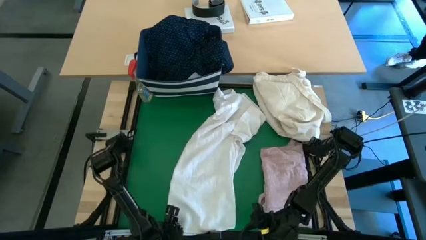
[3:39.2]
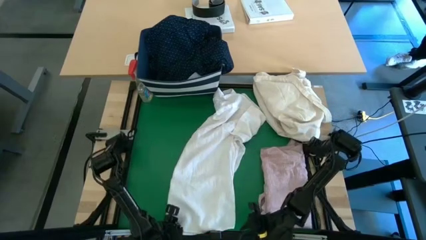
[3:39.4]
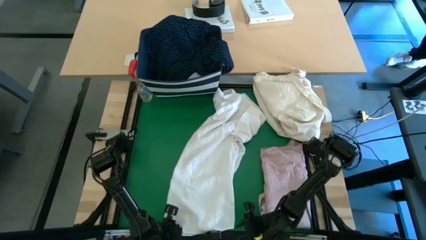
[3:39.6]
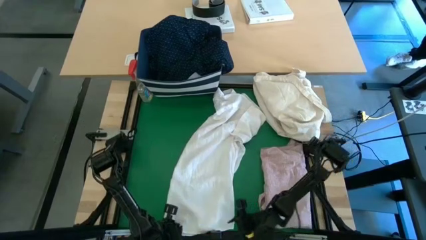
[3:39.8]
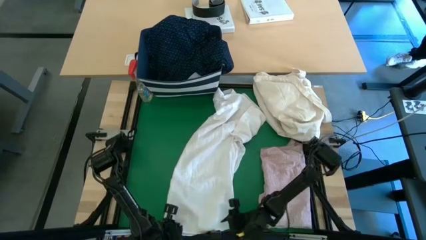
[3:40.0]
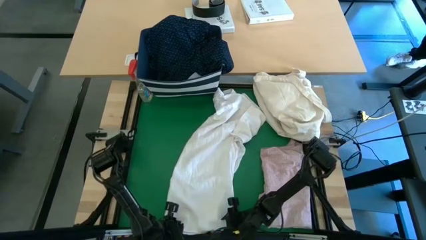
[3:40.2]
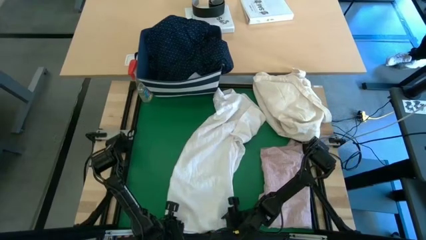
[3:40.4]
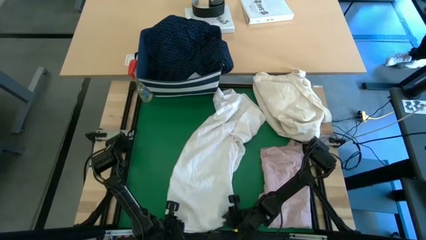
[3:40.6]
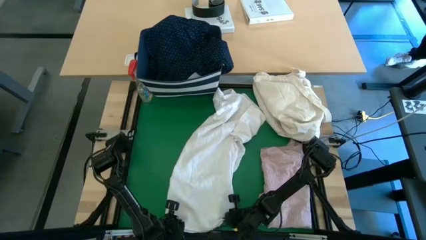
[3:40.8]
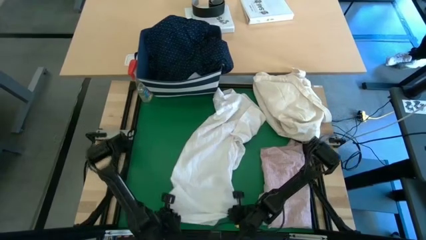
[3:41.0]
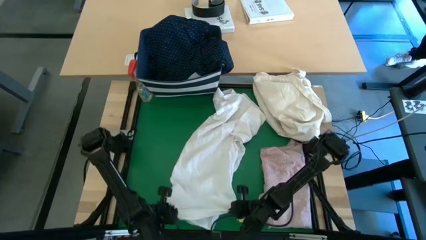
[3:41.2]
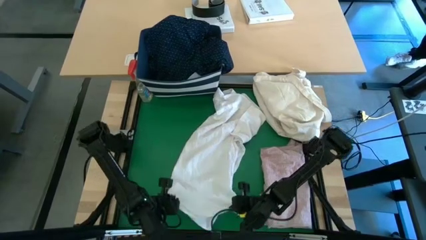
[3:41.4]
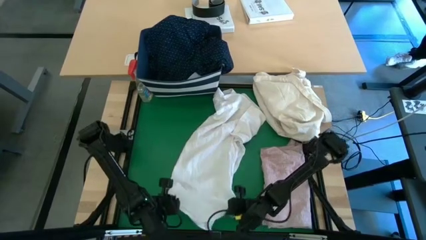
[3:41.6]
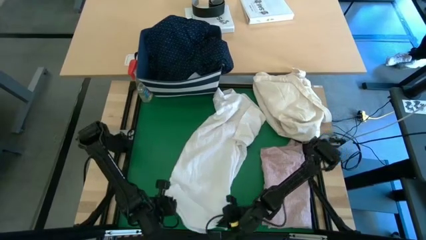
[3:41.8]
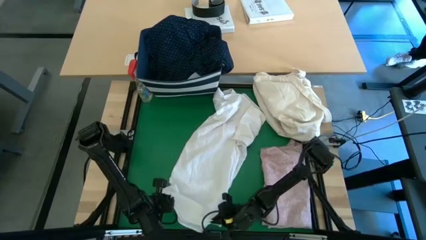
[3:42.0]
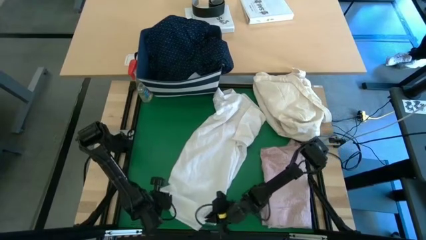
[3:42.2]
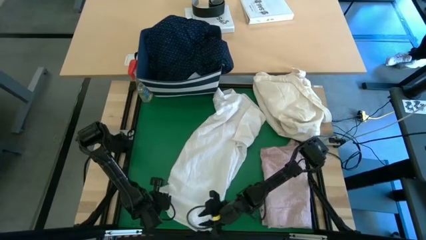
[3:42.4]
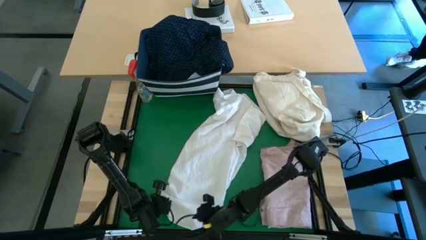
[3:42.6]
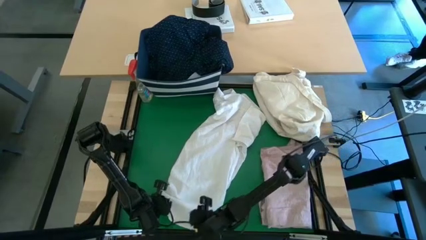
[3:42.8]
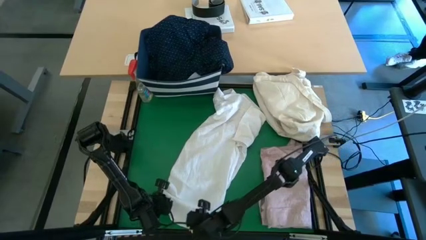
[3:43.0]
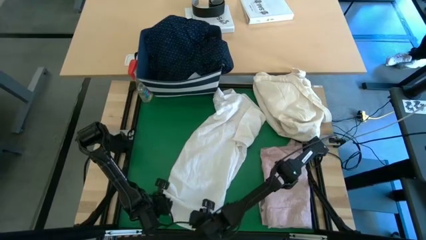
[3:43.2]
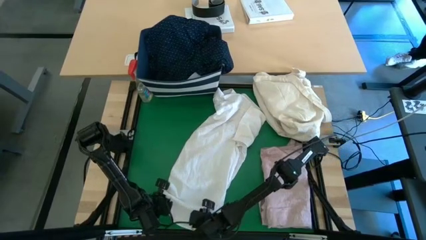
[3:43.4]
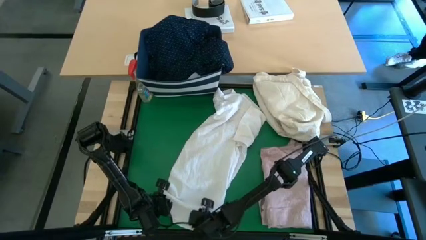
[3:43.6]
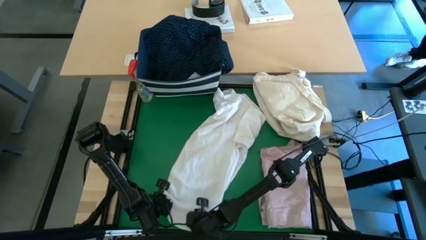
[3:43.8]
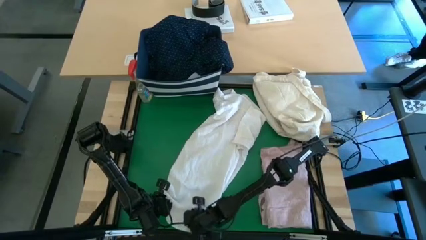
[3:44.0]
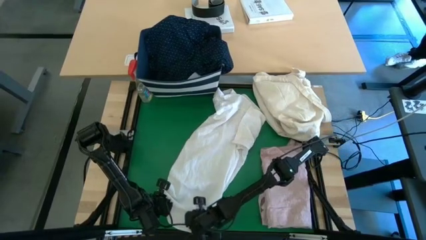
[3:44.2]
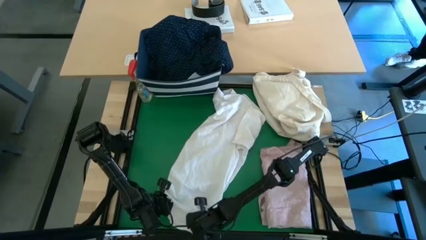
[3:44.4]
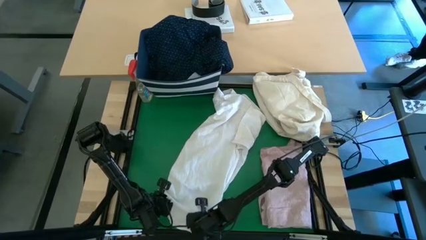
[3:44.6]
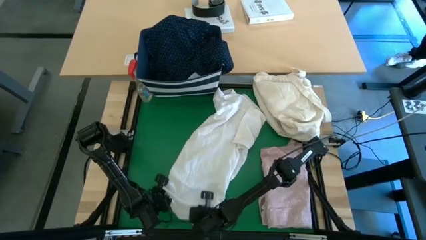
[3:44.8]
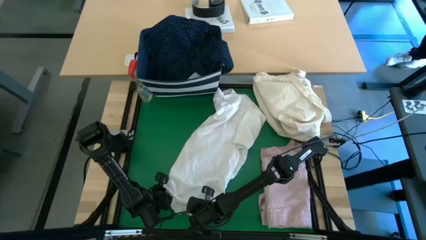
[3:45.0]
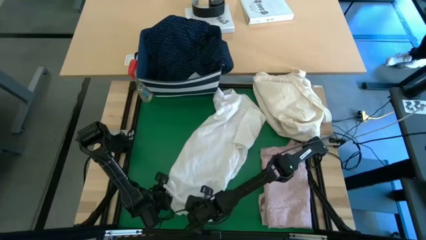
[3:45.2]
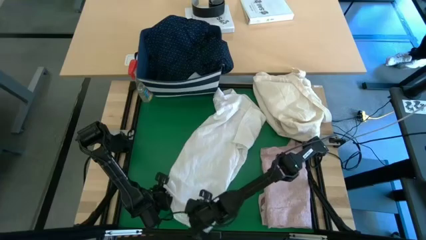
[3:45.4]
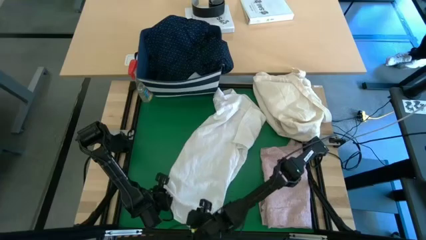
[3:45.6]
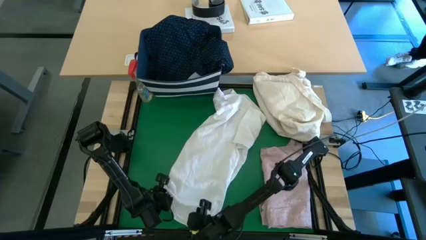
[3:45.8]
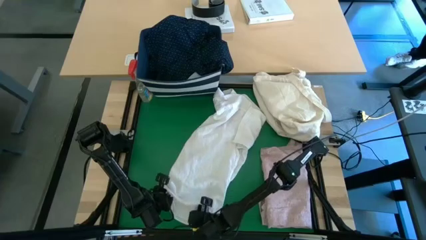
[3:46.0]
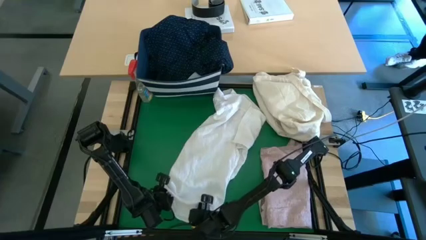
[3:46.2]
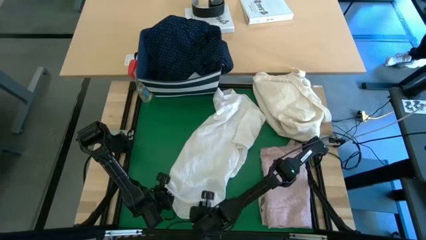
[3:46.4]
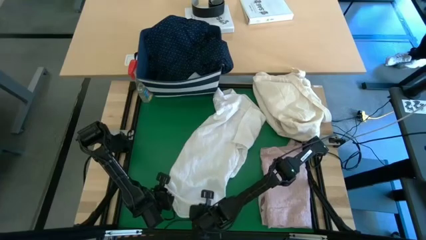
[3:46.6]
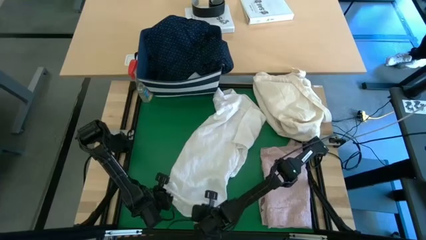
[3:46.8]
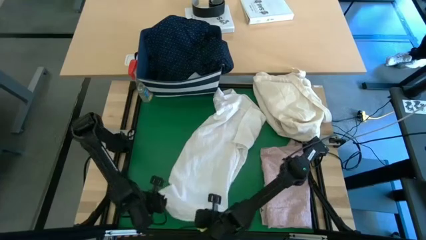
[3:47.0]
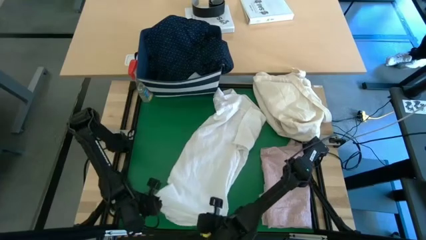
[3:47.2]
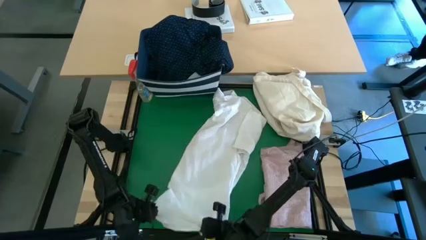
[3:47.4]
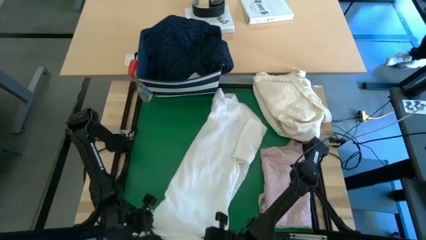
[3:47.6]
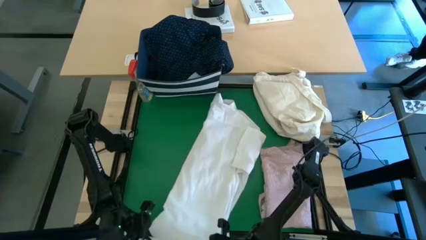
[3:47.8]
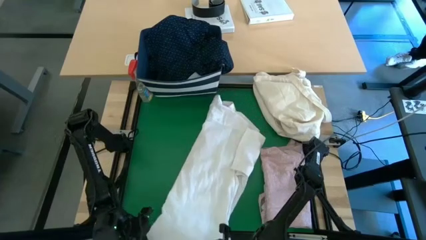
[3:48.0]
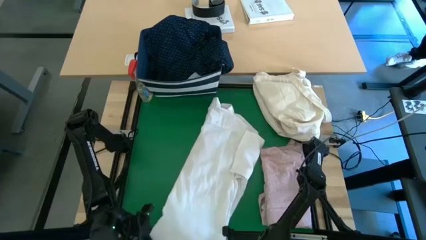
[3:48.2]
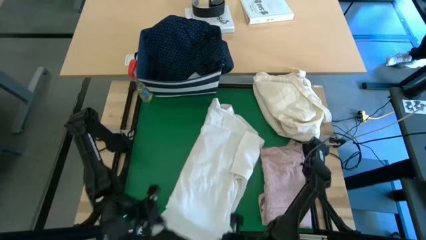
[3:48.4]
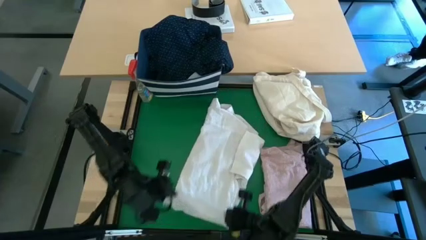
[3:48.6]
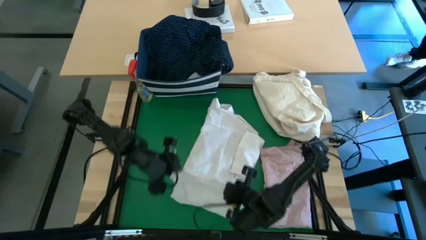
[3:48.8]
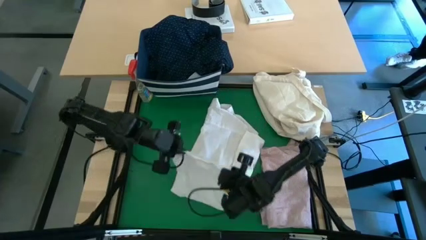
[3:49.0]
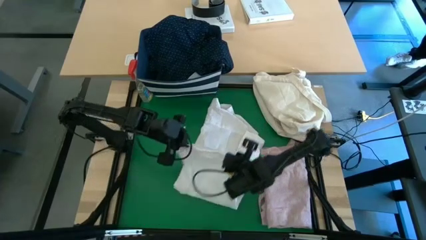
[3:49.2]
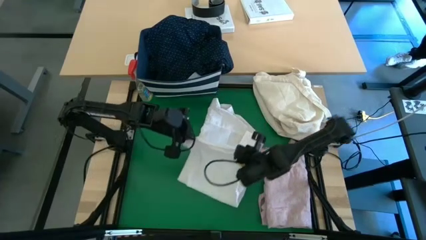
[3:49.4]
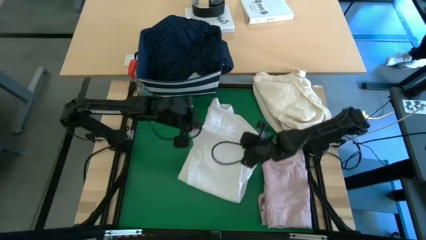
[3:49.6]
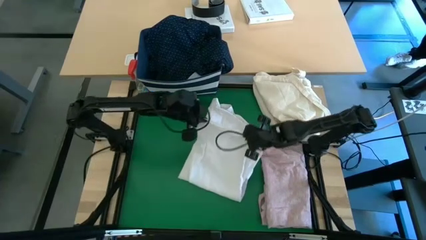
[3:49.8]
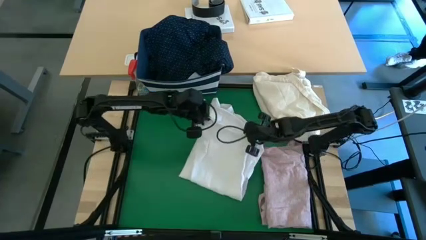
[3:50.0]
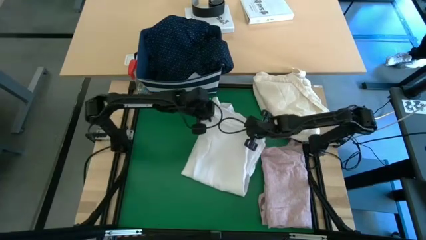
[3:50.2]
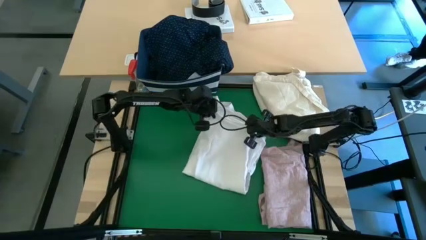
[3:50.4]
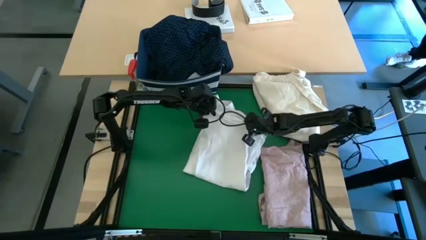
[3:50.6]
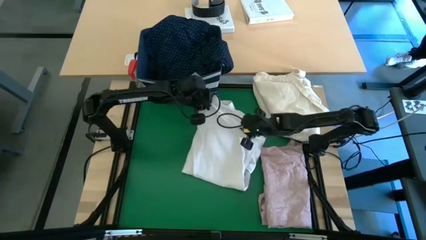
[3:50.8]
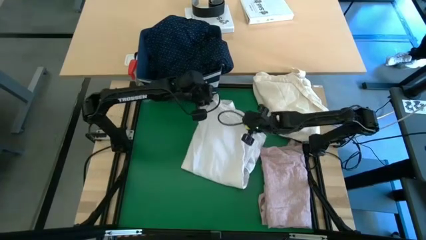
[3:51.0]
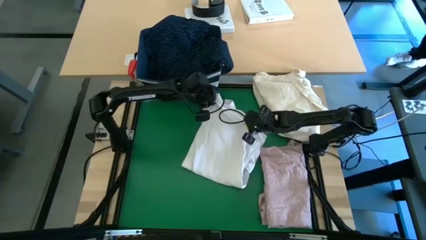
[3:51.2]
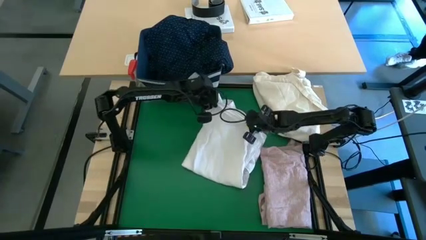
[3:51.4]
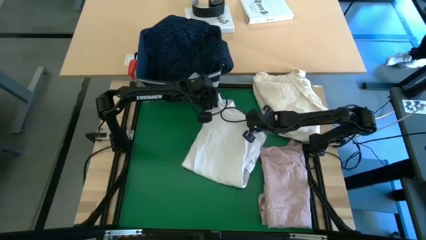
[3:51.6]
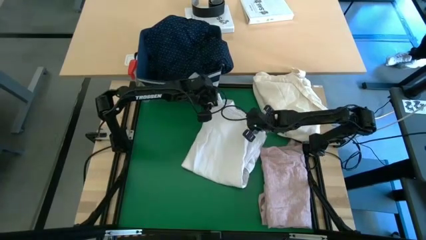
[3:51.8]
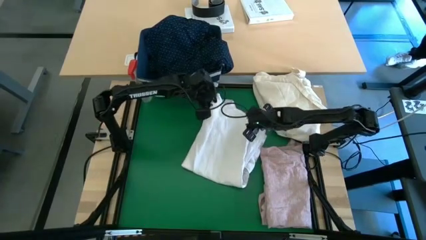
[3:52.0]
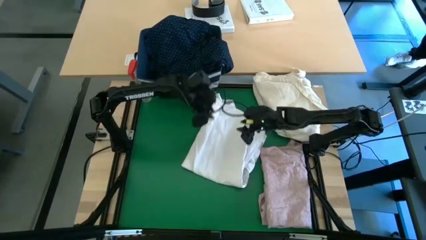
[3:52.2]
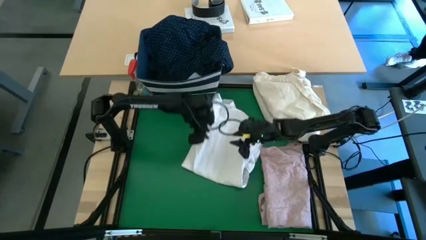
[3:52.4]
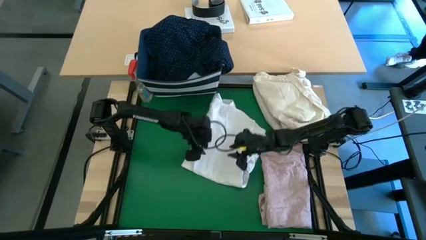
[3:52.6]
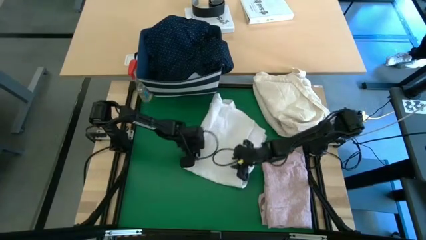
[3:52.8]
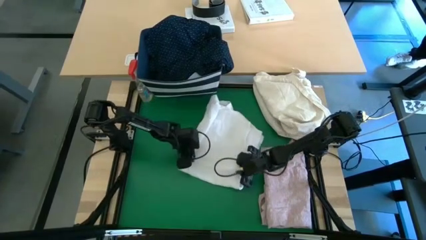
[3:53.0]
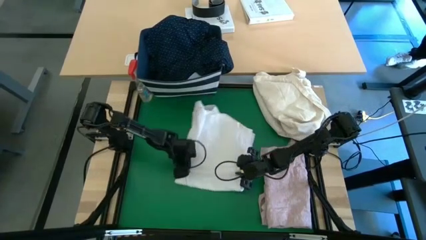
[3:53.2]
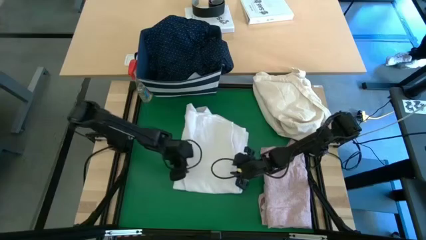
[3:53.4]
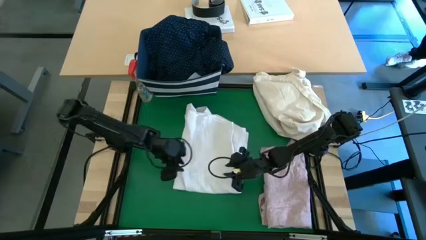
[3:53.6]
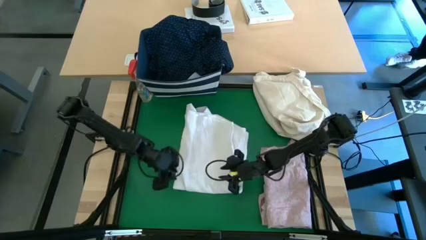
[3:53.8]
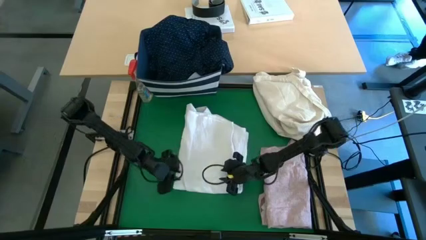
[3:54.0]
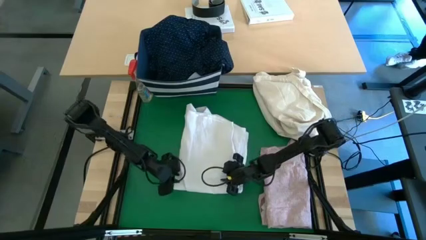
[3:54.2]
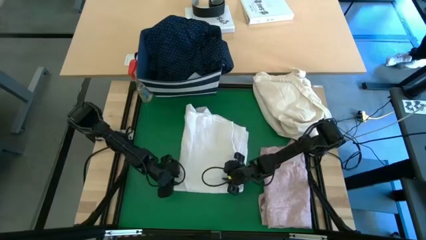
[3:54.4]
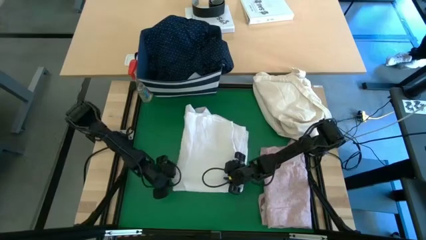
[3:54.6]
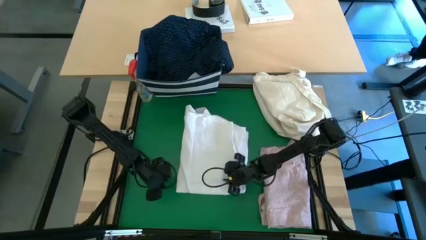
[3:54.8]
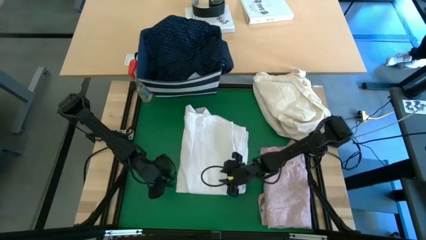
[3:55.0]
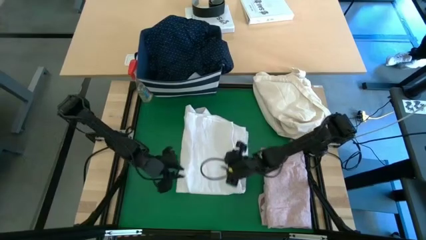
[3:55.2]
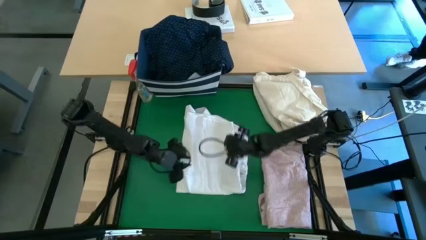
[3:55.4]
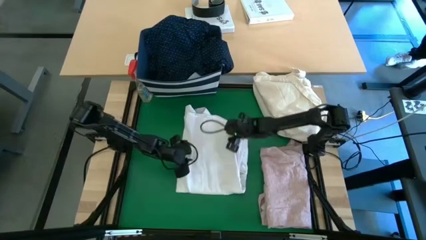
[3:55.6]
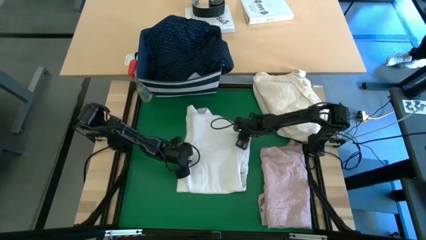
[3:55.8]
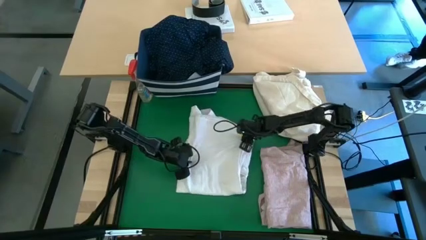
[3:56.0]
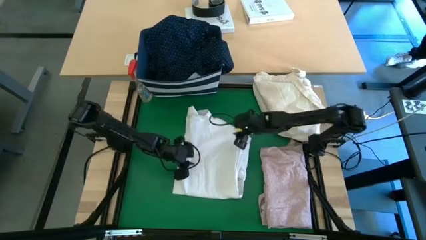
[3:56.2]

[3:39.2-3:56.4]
Task: Fold laundry
Fold the white polo shirt
